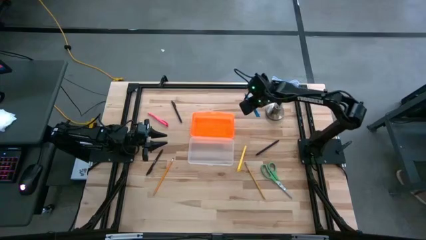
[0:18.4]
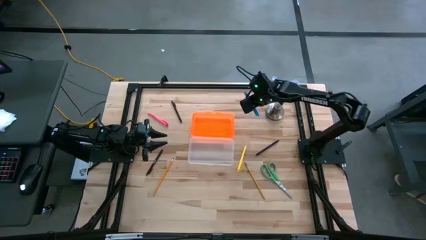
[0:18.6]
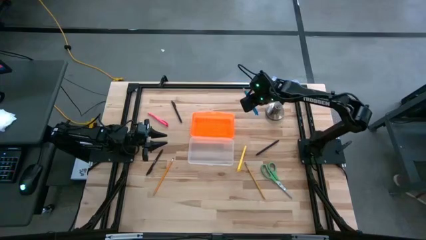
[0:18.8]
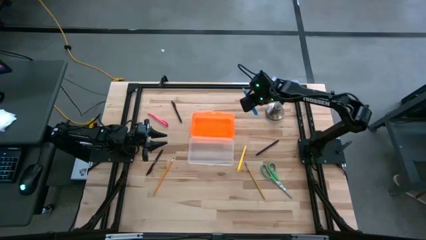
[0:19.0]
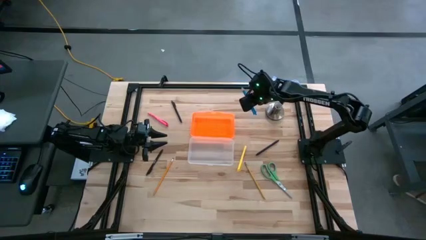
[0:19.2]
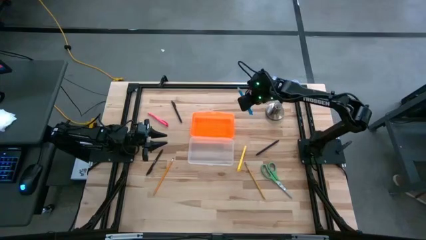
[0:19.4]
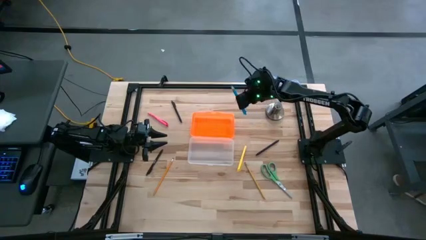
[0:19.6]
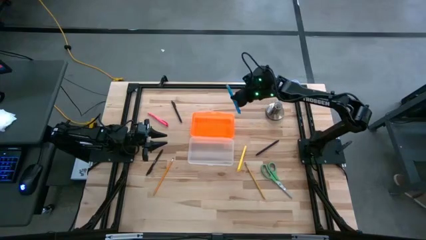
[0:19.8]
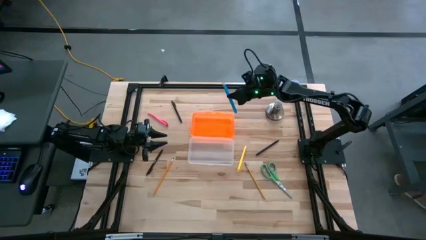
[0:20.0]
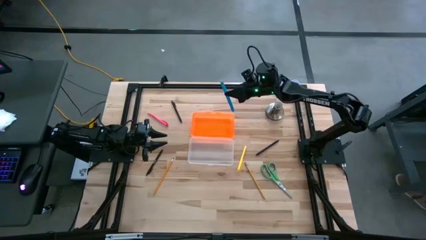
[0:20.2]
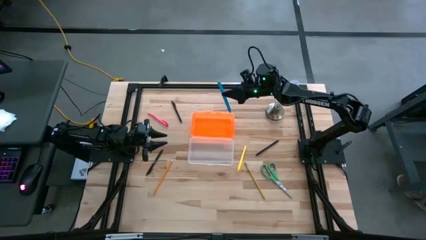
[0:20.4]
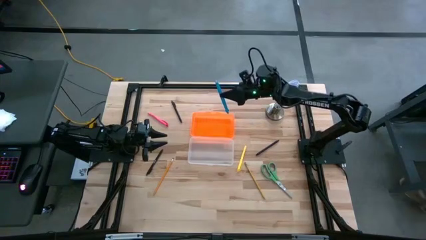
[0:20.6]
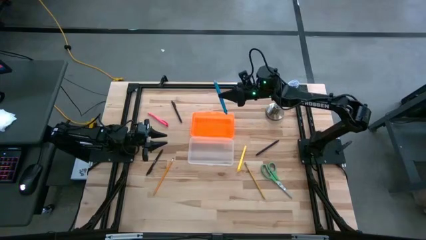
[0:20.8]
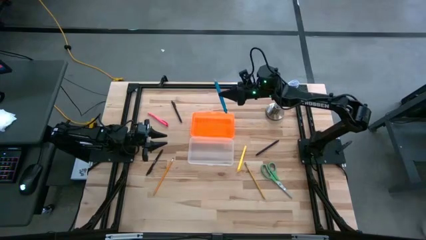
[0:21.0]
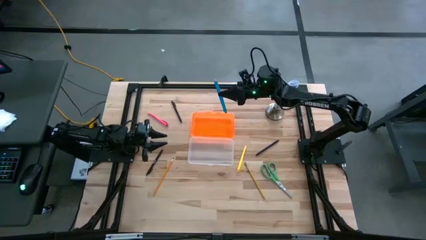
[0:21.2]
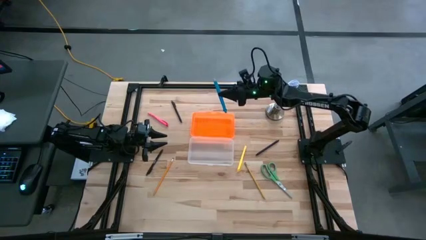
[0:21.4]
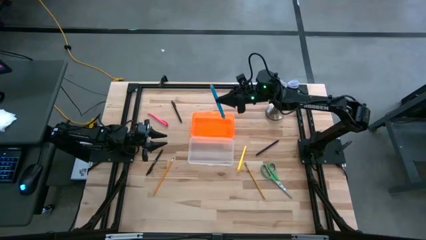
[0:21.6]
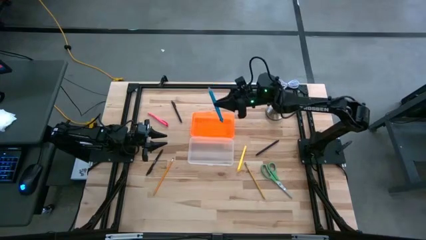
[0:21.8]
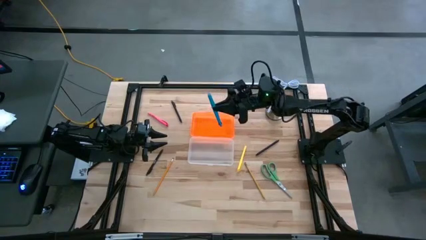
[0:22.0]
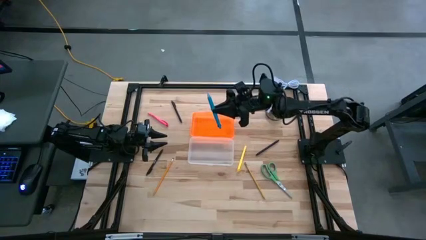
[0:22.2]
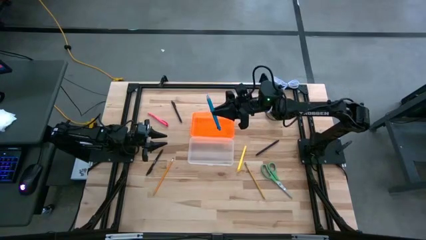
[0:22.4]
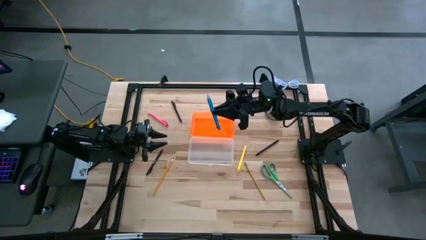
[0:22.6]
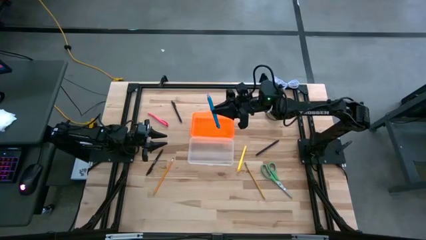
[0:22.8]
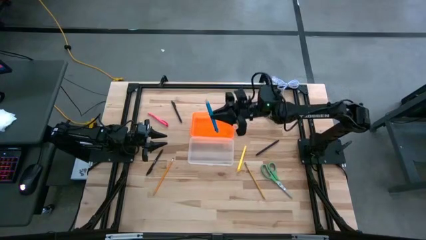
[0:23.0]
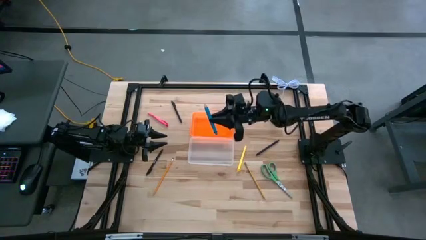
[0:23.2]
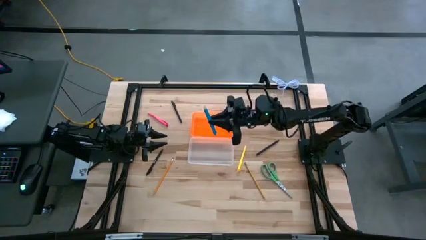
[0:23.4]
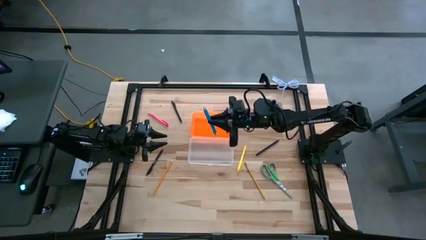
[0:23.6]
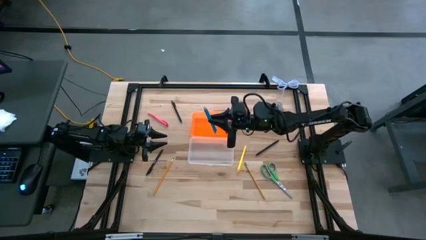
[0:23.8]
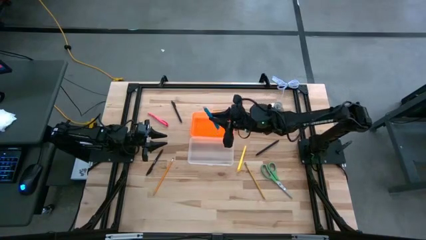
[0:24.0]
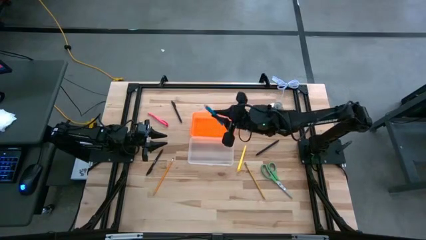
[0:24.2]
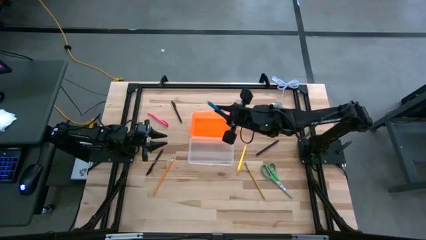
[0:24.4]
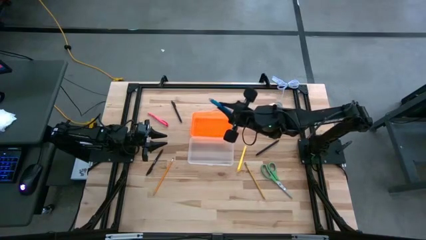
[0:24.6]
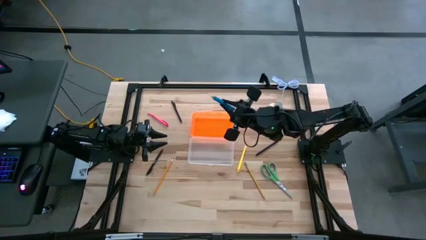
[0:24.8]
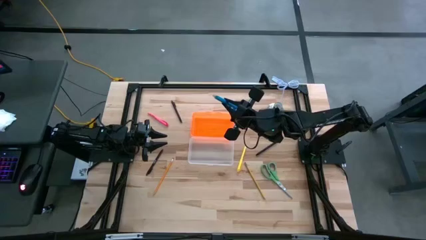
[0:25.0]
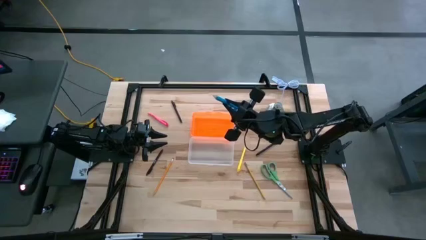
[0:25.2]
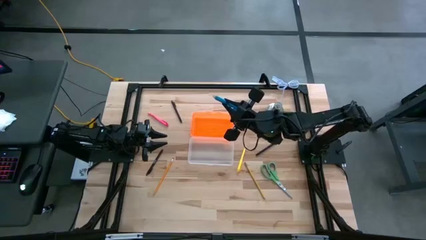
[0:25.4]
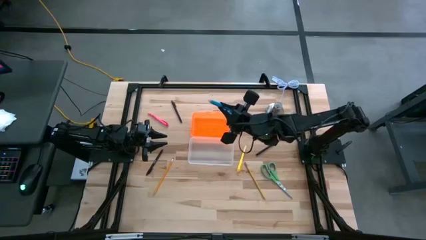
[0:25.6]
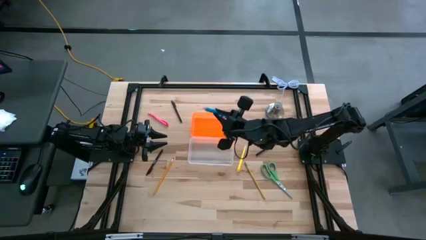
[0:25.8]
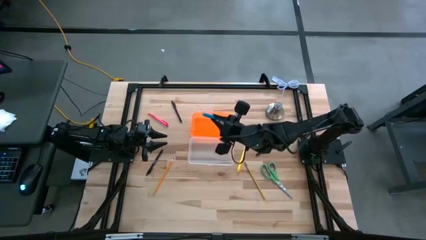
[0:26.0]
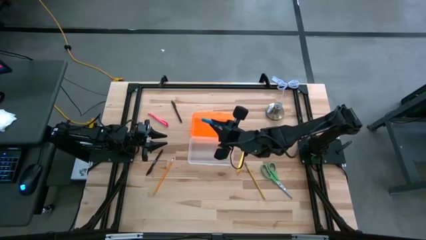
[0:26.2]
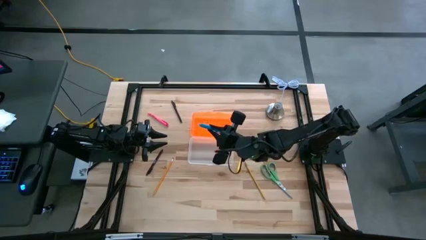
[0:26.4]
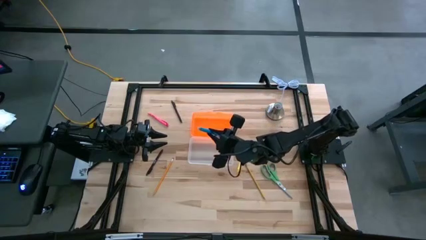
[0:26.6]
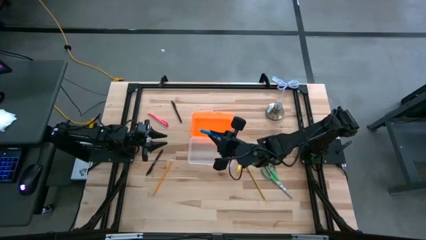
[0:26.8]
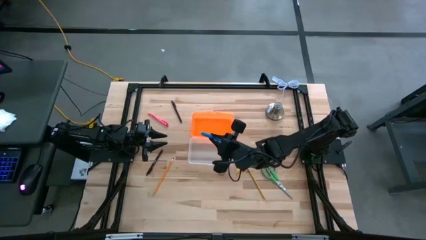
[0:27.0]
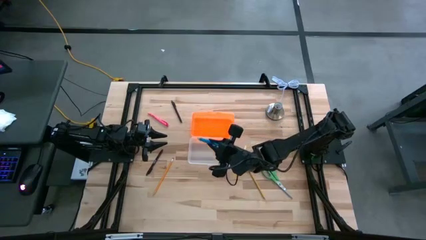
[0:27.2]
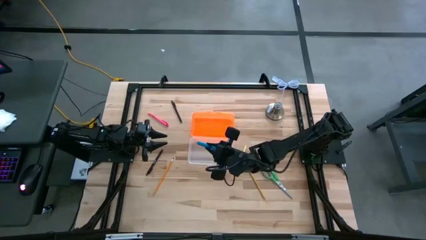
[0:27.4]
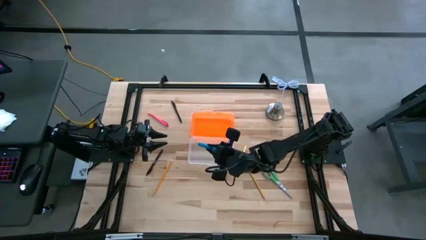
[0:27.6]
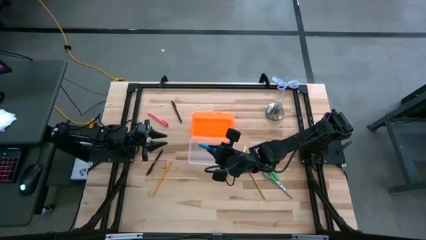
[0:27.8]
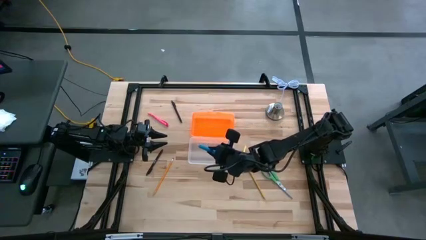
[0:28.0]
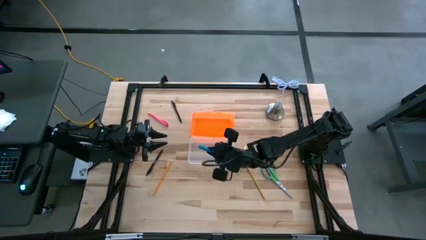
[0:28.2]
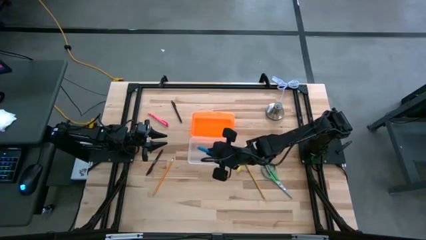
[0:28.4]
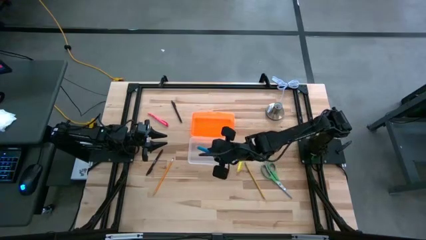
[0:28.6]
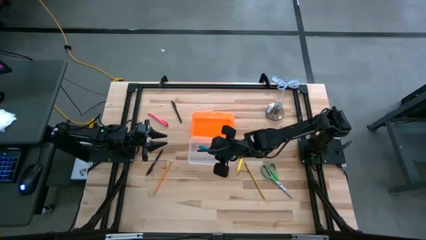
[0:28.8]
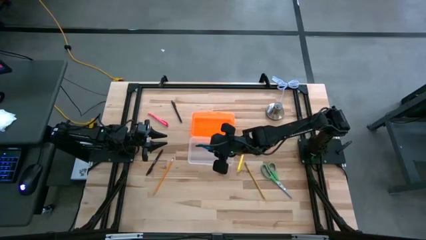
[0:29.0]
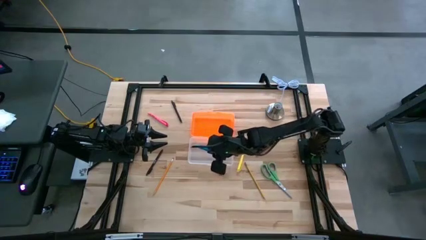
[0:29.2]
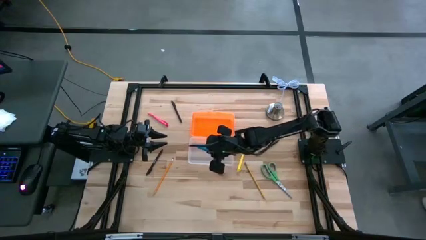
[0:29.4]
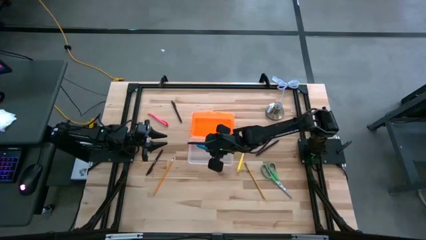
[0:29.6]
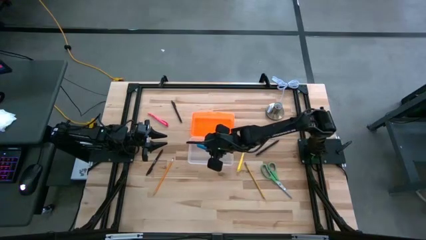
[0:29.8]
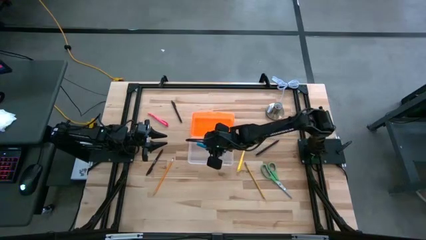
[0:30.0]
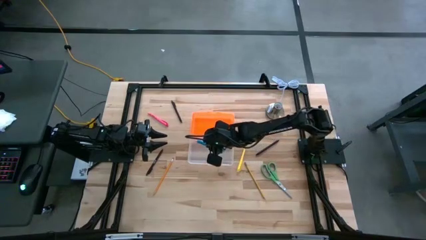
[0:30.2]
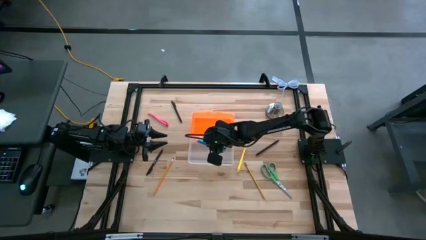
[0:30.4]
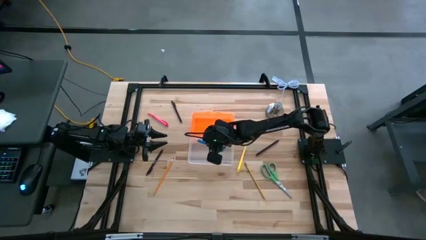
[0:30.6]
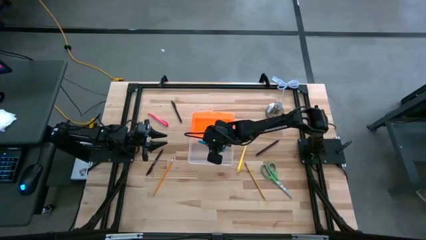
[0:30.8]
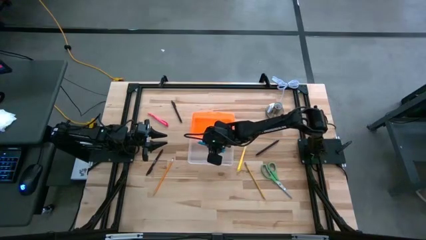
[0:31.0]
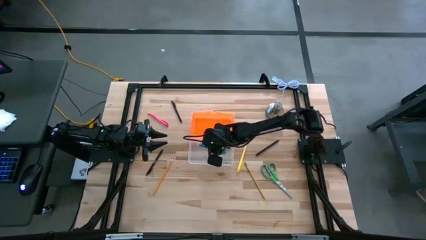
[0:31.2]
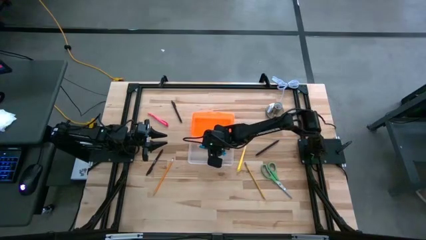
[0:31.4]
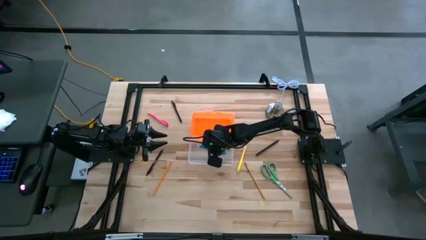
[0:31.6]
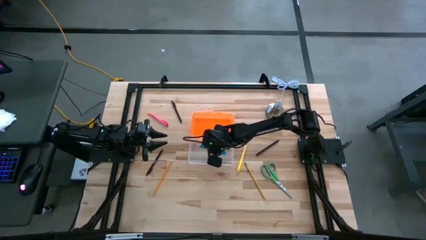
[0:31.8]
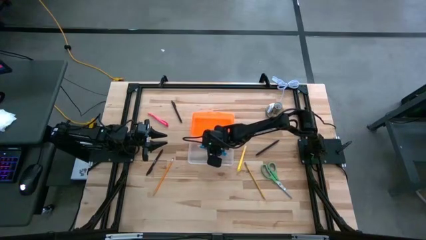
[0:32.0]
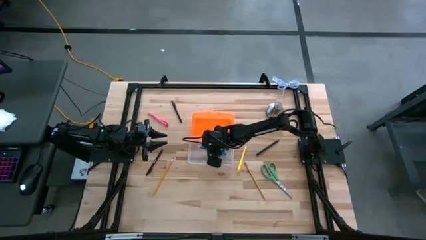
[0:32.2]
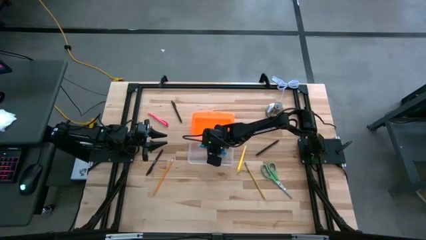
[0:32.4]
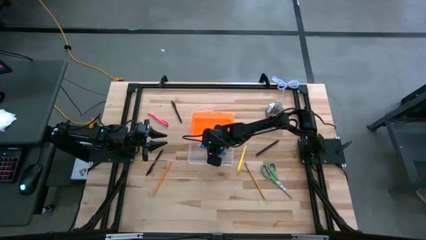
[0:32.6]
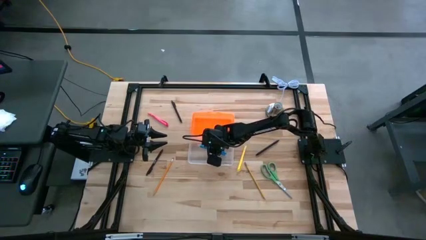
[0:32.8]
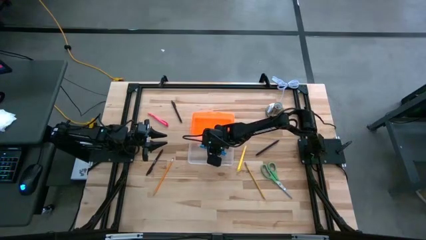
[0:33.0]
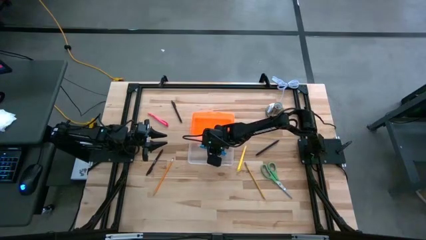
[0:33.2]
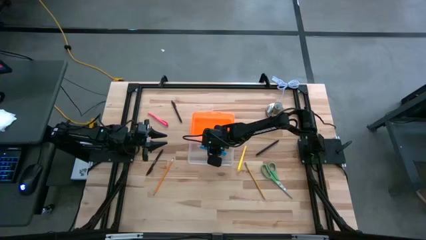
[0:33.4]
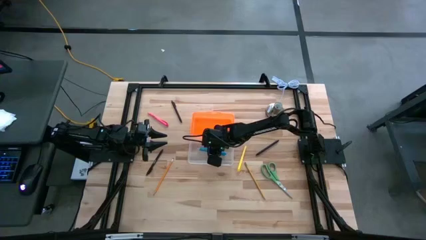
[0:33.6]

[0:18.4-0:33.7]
Task: Pick & place school supplies into a supply box
Put the blue pen into the orange supply box
